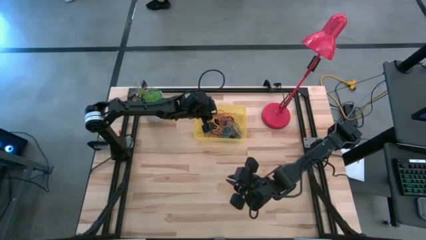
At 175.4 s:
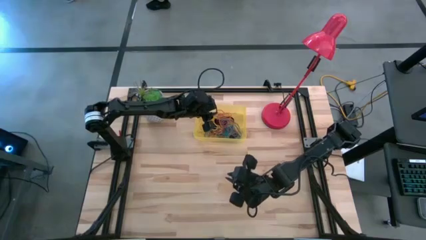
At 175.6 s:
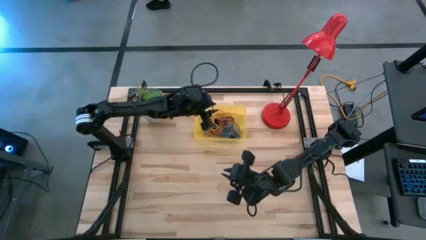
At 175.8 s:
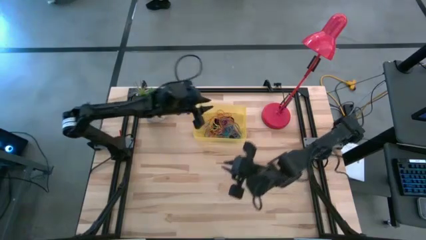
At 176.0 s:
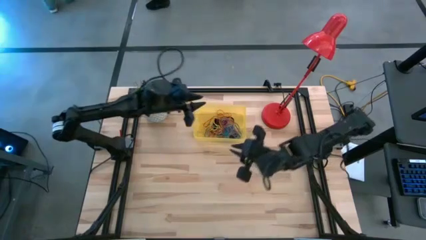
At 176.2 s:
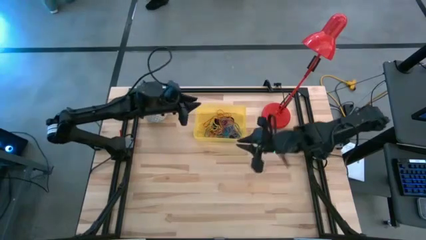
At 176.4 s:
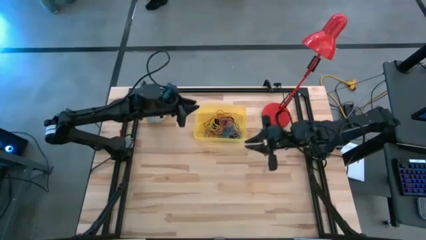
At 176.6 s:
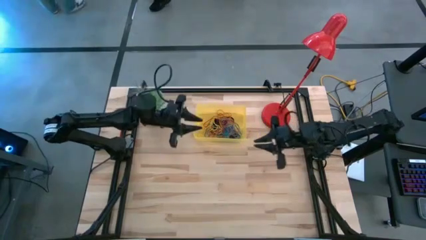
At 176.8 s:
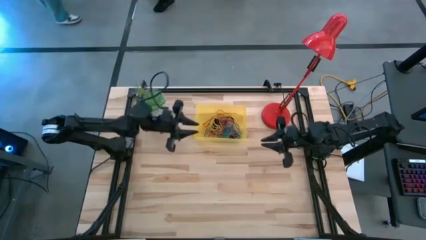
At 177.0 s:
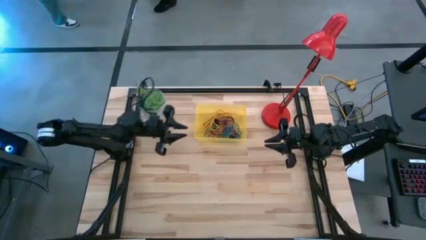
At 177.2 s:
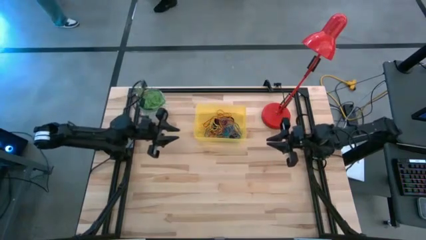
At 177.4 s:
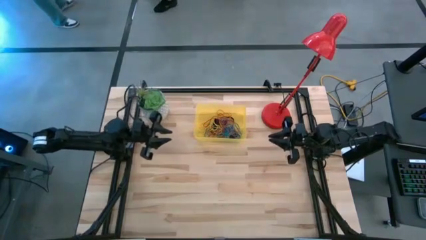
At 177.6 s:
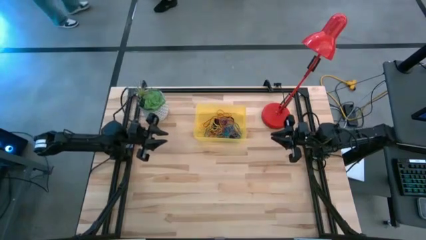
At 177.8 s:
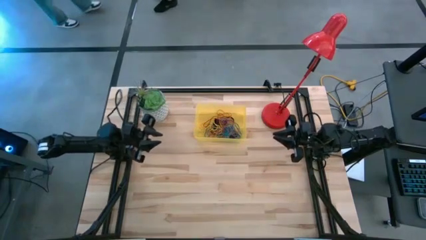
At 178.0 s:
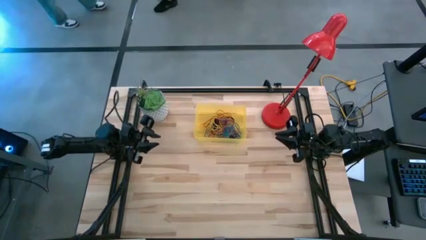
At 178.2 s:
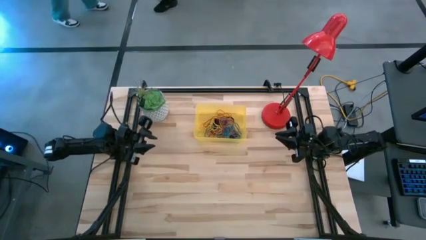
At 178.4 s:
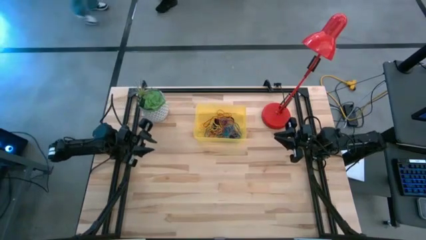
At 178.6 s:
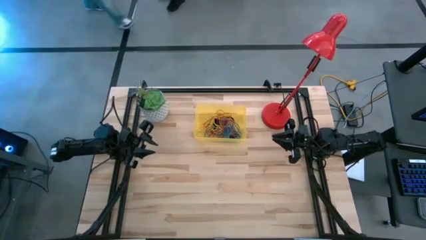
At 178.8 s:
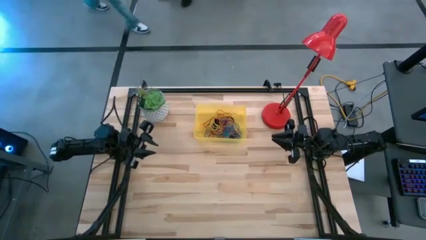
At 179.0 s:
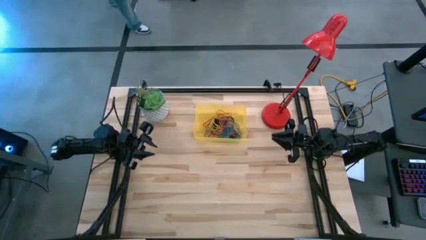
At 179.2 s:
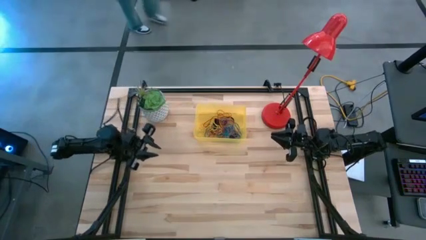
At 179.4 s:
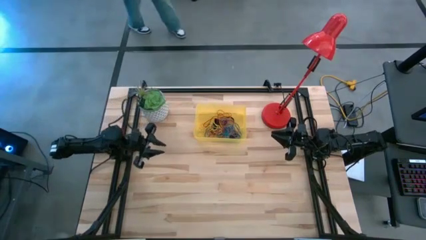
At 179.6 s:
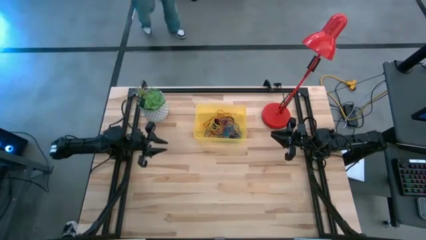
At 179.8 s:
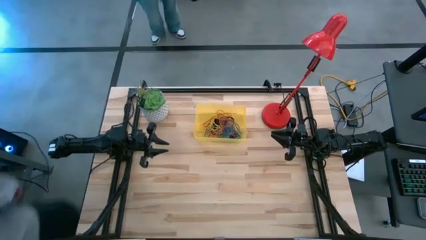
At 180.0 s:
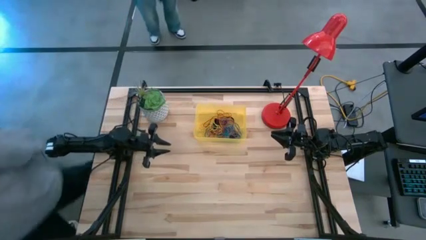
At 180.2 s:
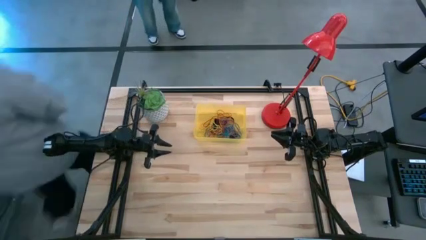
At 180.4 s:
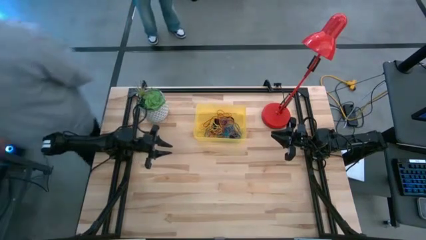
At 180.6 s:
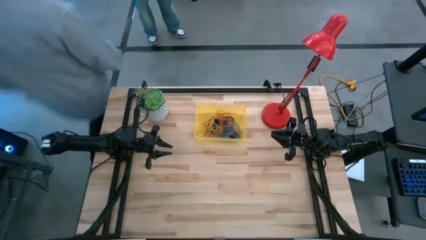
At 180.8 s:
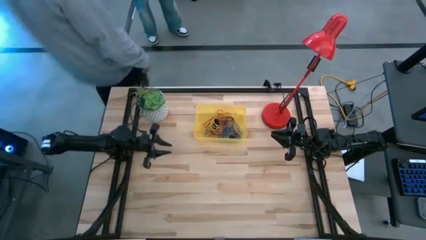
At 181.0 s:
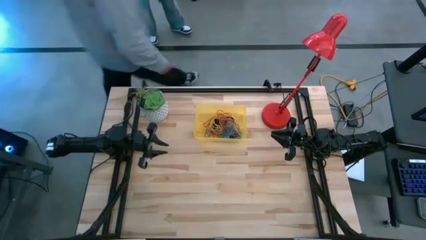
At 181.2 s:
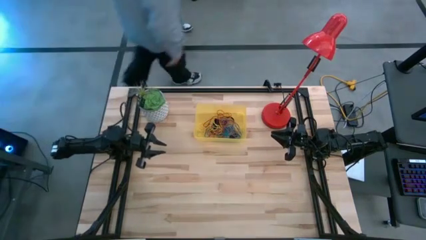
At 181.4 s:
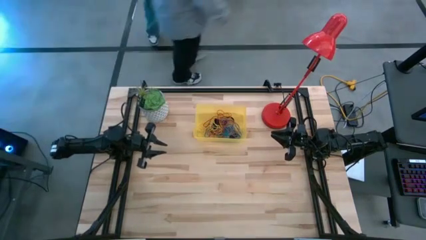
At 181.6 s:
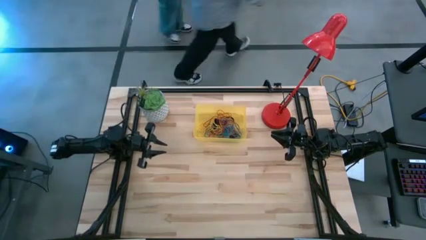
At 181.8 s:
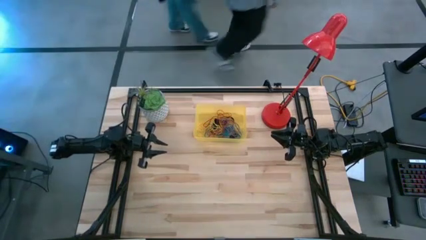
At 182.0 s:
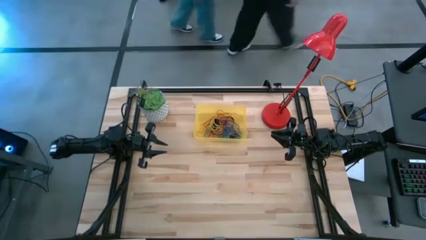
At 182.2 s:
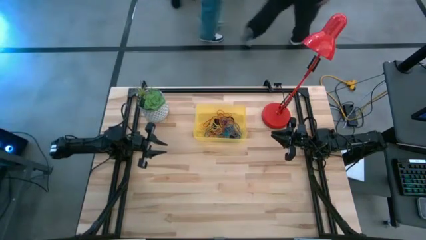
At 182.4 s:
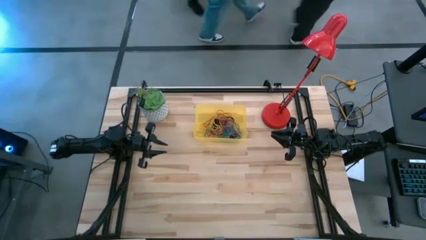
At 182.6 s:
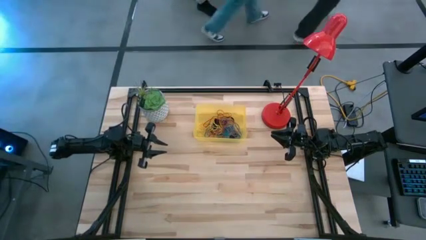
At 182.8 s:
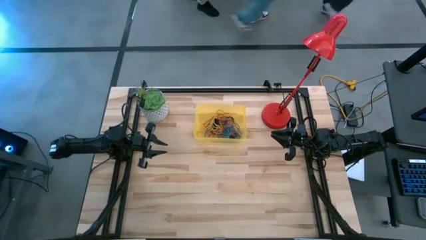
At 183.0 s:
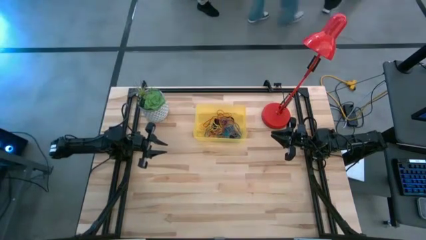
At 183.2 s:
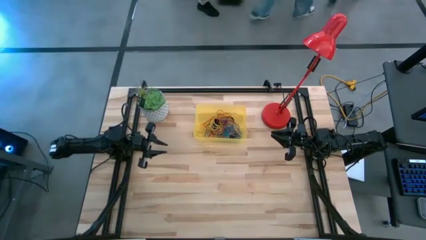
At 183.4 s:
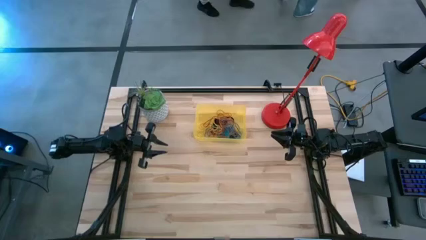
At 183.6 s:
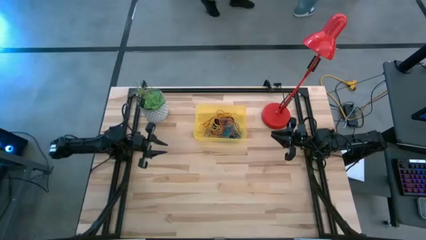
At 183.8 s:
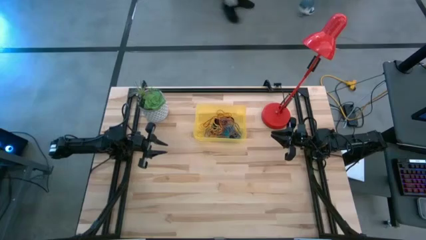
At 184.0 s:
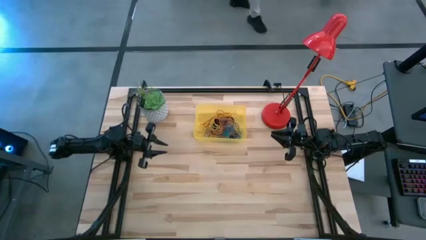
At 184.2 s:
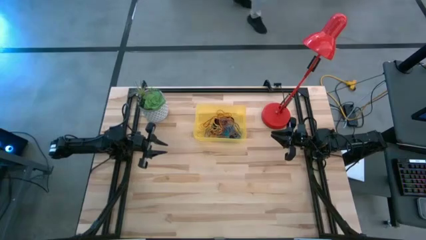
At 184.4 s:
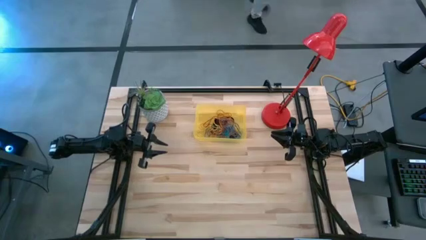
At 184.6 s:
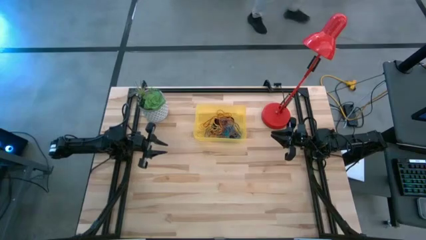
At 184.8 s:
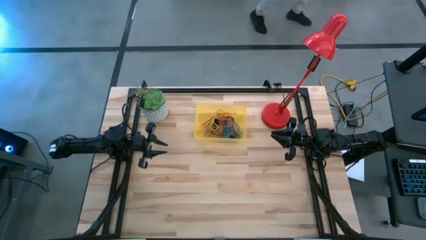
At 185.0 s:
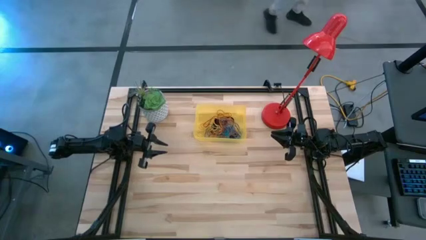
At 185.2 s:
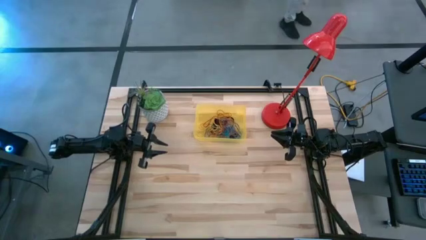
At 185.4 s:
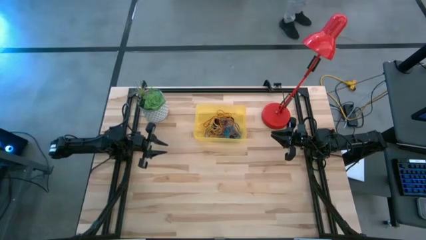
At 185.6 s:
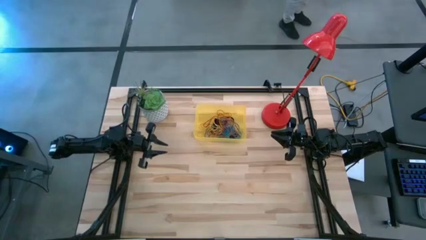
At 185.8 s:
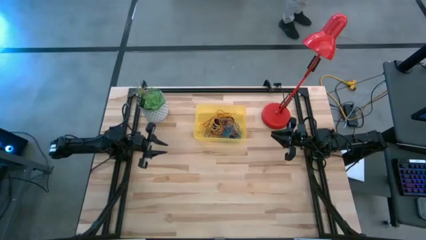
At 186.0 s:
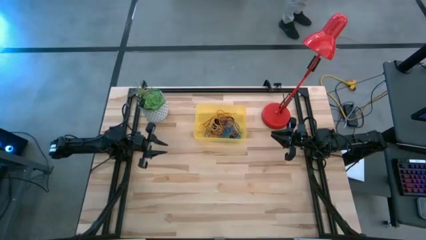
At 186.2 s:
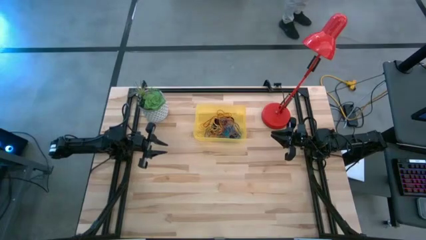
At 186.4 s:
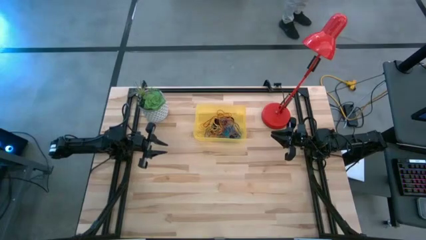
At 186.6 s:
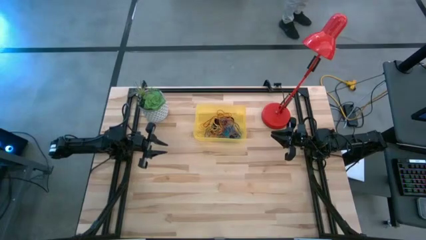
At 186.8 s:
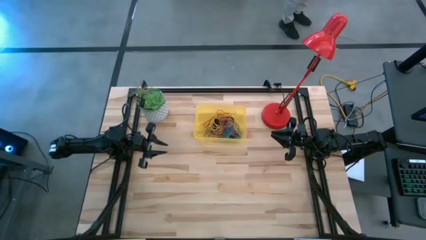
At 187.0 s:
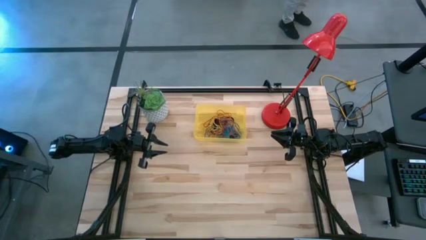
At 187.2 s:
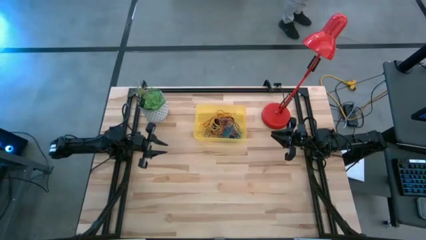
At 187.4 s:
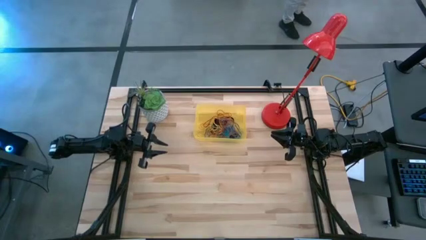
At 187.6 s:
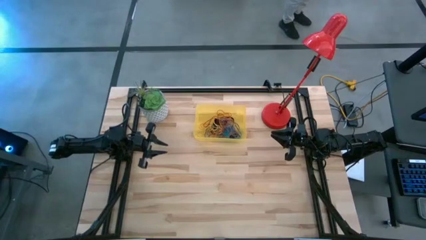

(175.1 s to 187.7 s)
Task: Pick and place rubber bands into bin
Return to Home Position
